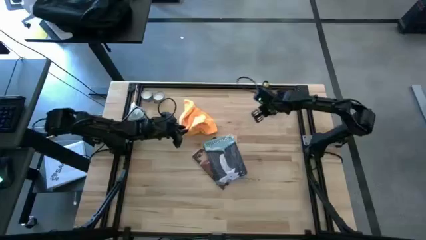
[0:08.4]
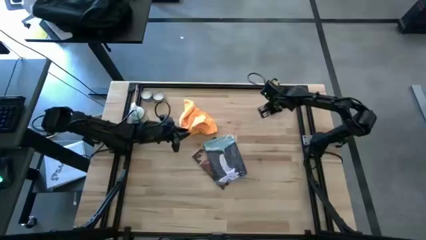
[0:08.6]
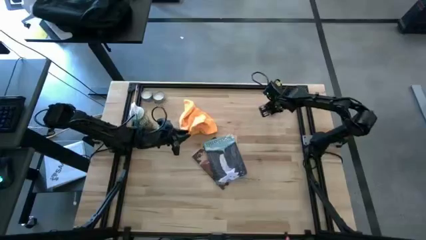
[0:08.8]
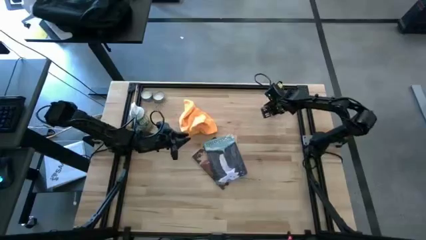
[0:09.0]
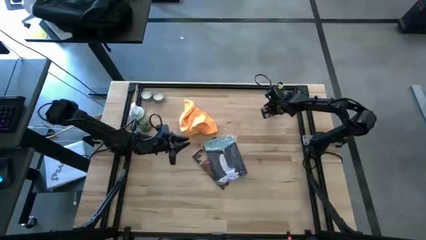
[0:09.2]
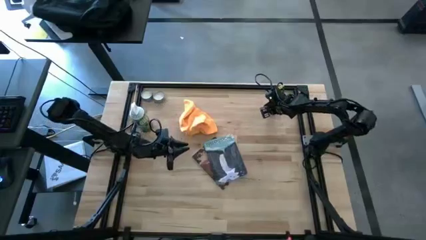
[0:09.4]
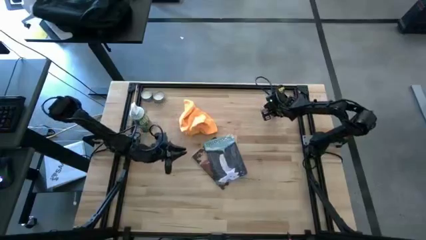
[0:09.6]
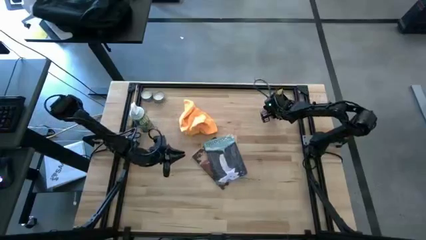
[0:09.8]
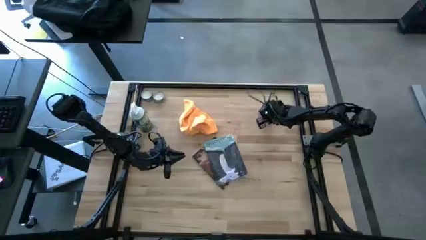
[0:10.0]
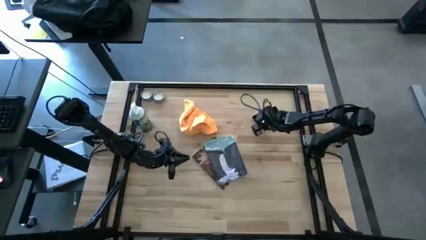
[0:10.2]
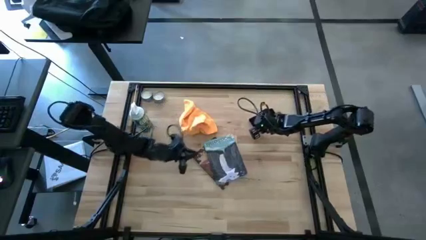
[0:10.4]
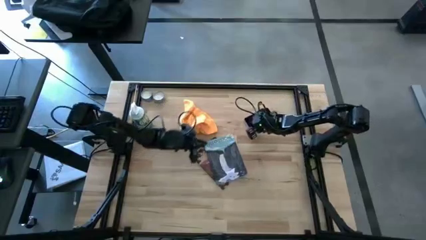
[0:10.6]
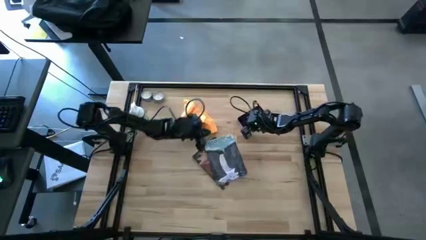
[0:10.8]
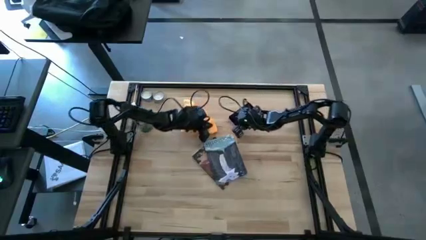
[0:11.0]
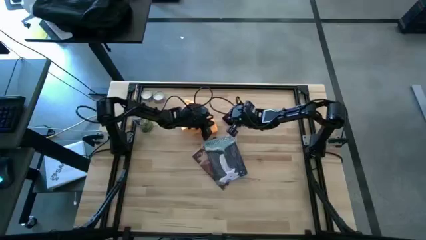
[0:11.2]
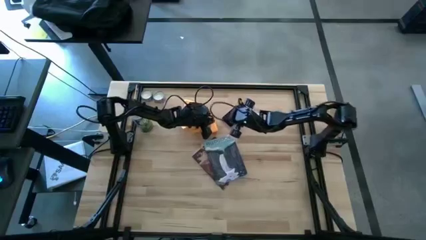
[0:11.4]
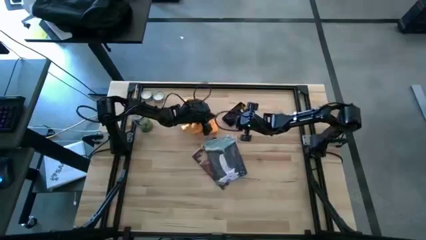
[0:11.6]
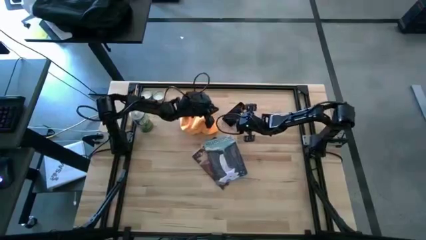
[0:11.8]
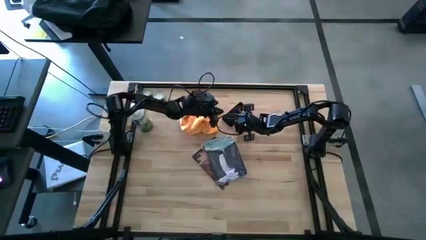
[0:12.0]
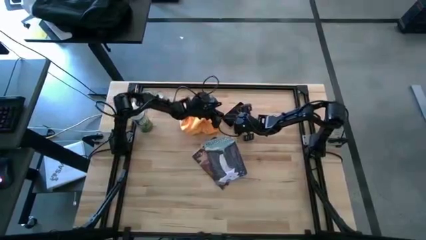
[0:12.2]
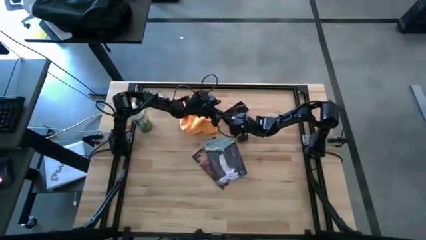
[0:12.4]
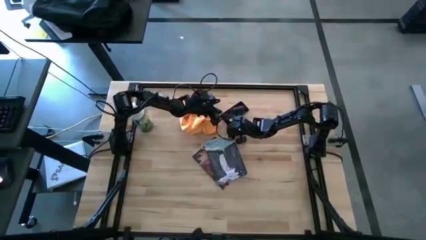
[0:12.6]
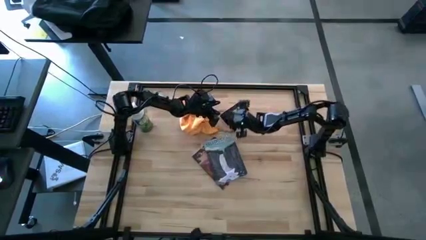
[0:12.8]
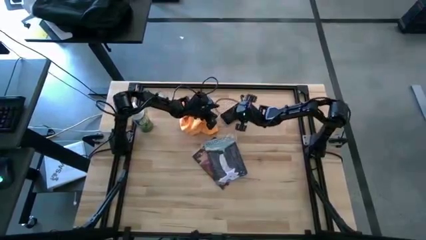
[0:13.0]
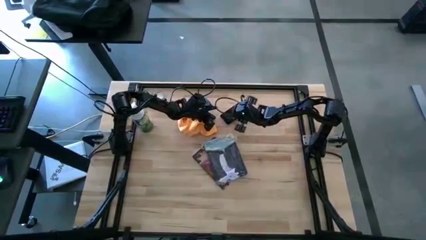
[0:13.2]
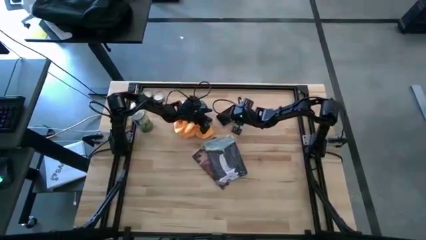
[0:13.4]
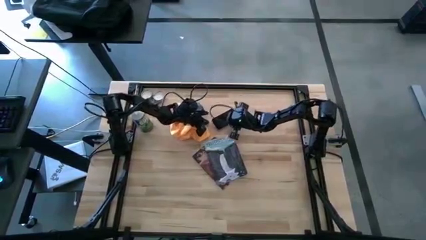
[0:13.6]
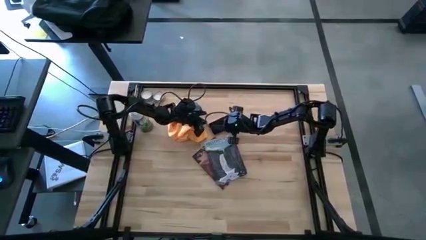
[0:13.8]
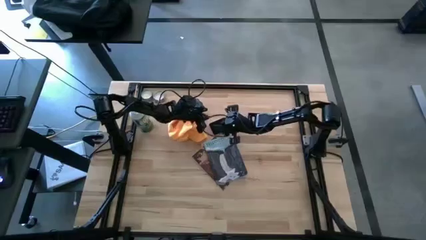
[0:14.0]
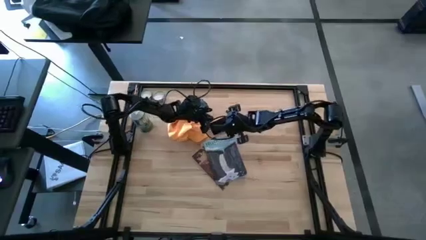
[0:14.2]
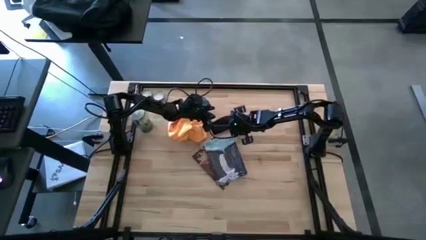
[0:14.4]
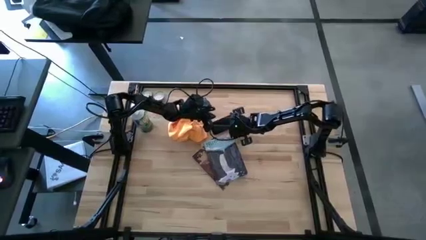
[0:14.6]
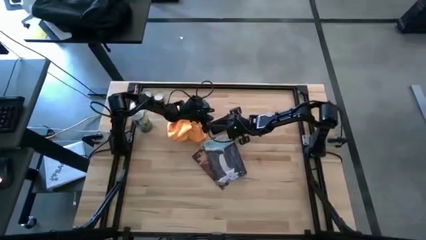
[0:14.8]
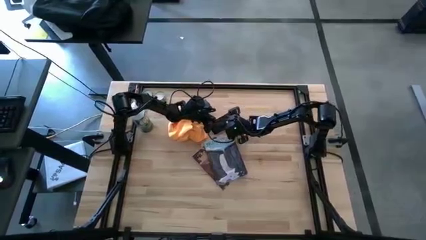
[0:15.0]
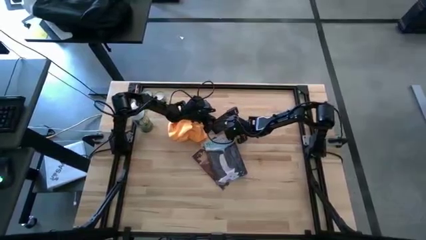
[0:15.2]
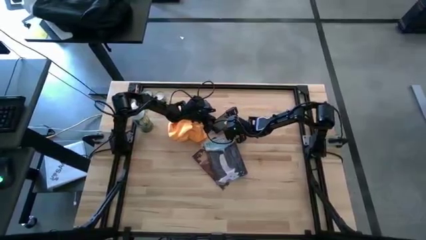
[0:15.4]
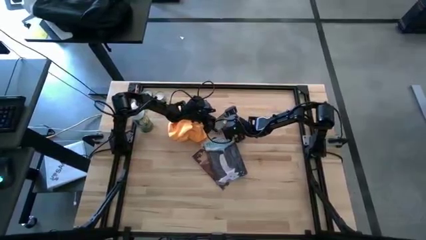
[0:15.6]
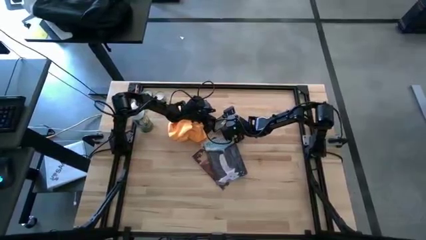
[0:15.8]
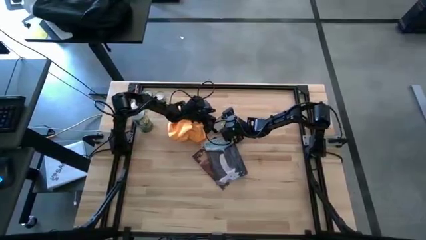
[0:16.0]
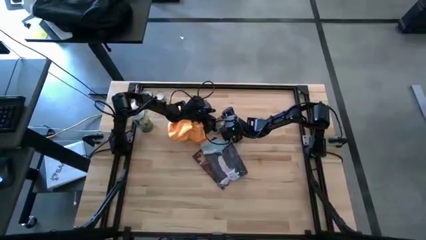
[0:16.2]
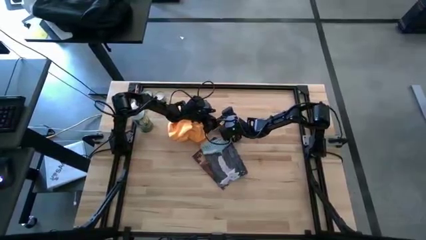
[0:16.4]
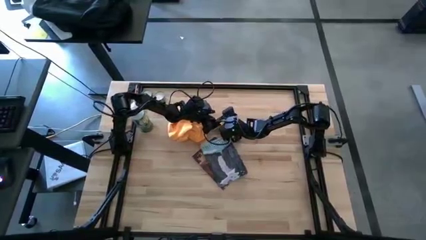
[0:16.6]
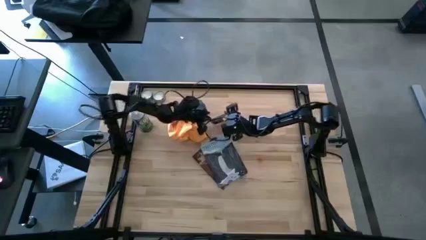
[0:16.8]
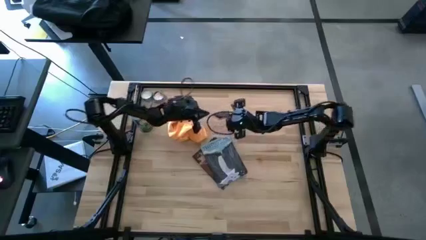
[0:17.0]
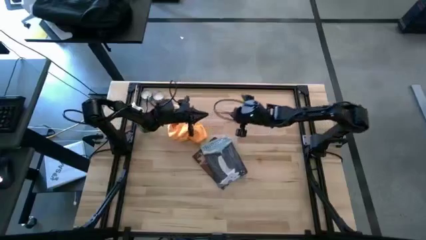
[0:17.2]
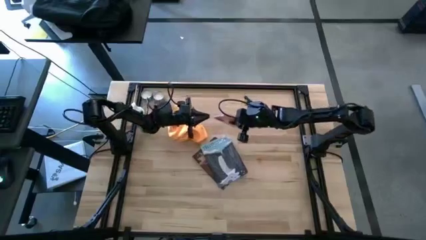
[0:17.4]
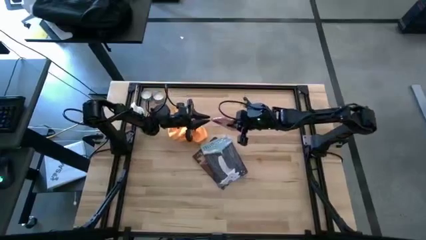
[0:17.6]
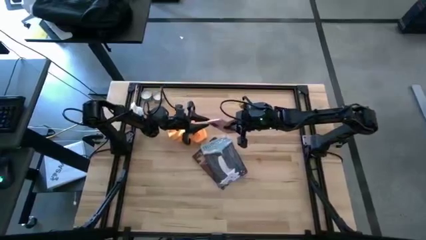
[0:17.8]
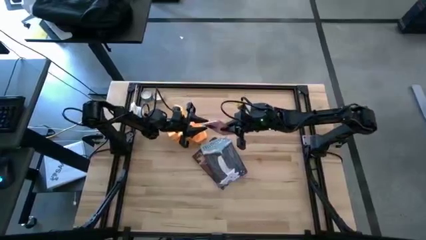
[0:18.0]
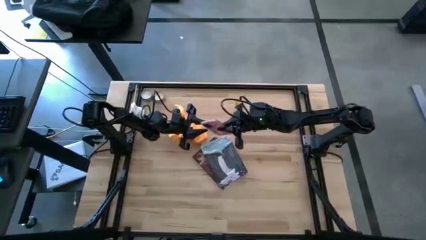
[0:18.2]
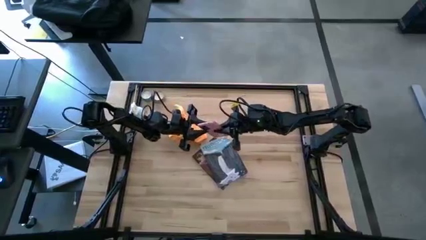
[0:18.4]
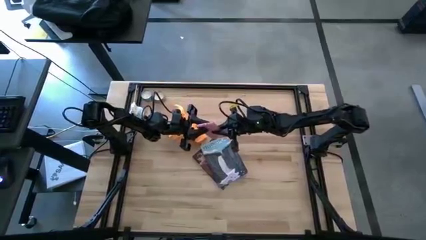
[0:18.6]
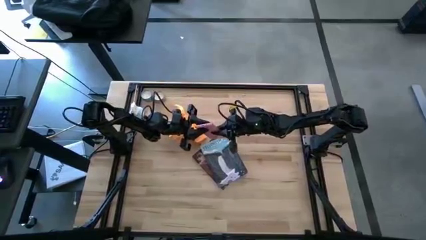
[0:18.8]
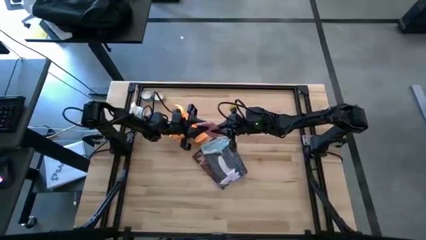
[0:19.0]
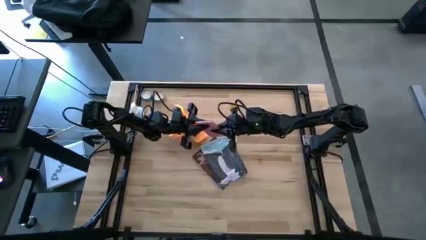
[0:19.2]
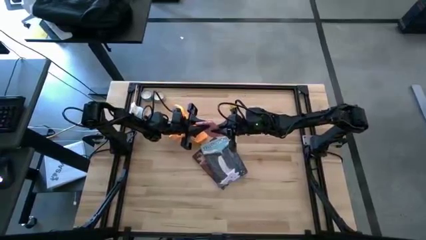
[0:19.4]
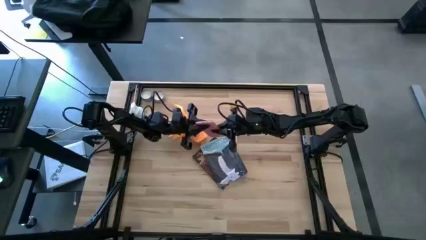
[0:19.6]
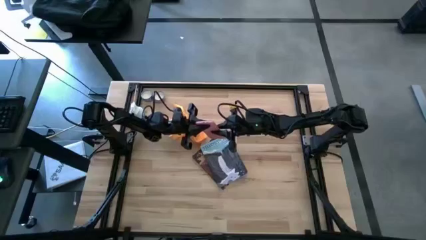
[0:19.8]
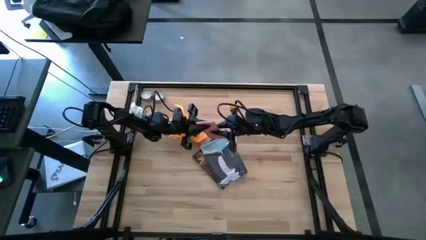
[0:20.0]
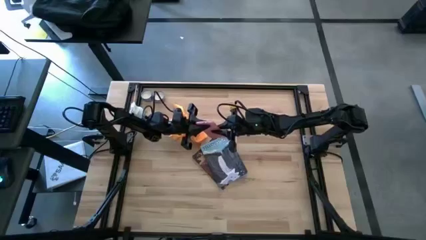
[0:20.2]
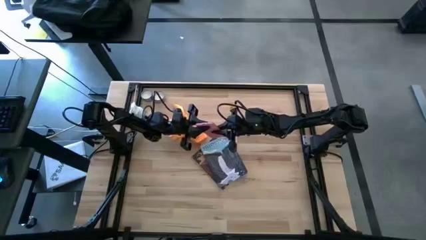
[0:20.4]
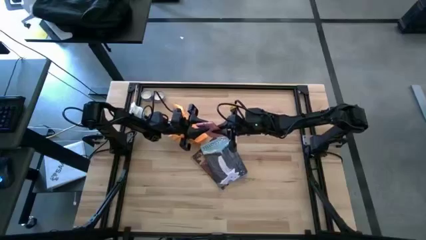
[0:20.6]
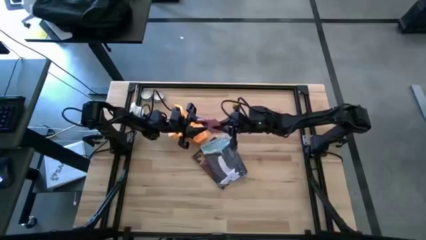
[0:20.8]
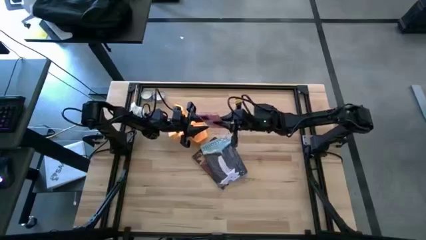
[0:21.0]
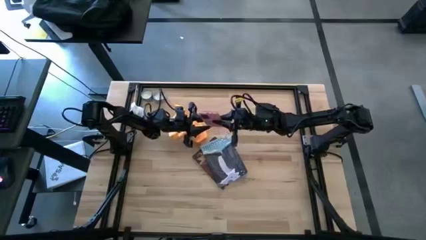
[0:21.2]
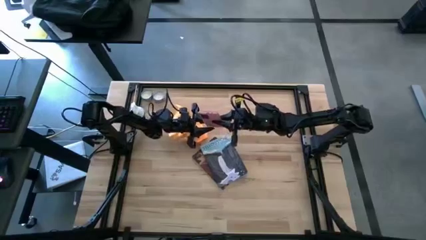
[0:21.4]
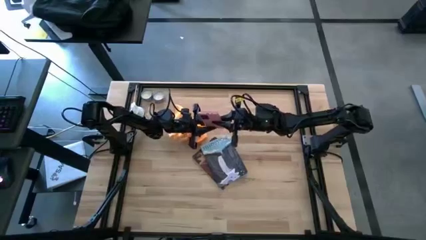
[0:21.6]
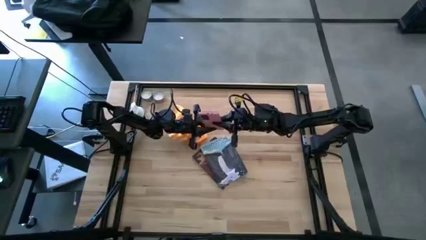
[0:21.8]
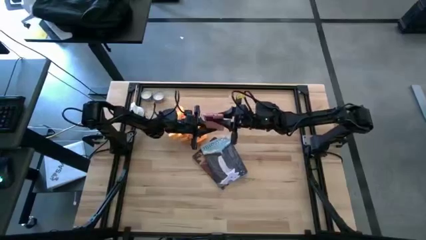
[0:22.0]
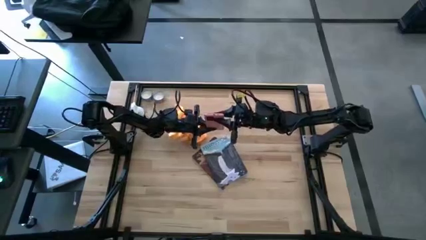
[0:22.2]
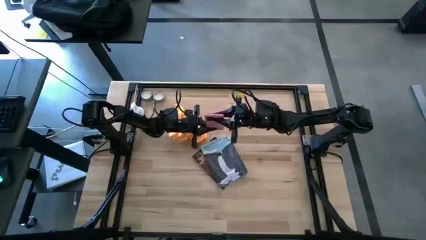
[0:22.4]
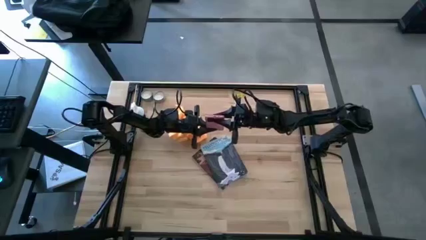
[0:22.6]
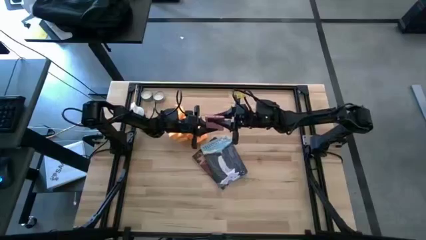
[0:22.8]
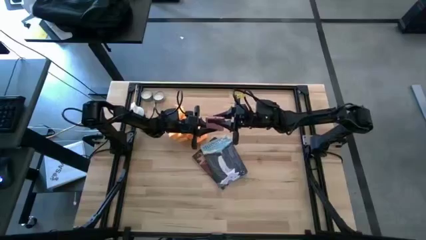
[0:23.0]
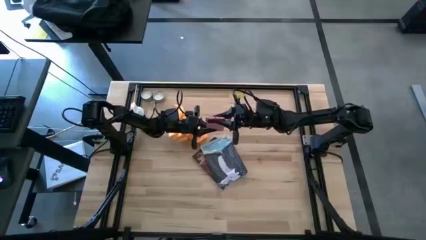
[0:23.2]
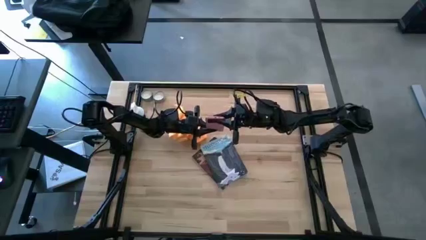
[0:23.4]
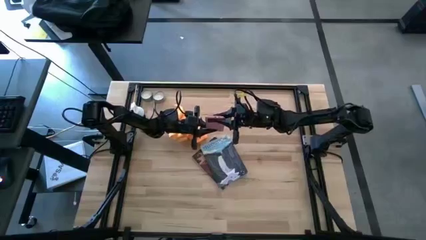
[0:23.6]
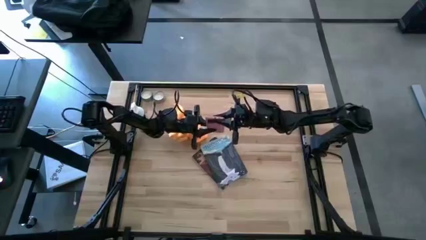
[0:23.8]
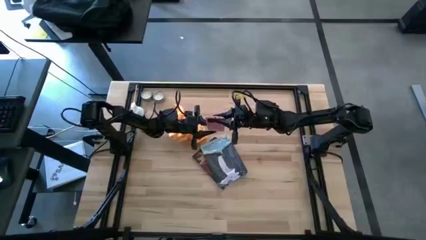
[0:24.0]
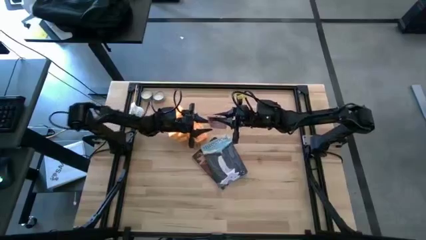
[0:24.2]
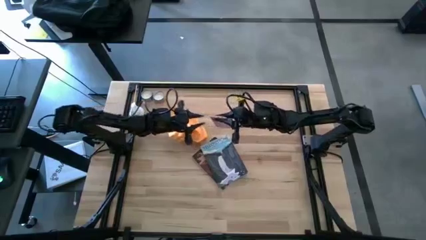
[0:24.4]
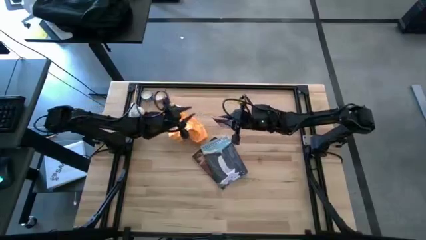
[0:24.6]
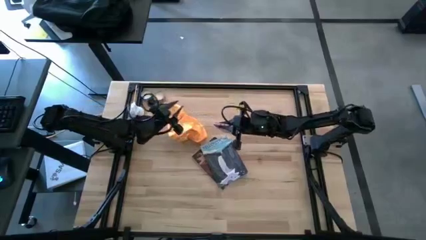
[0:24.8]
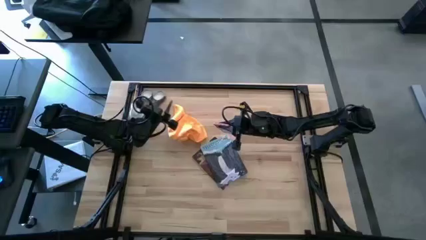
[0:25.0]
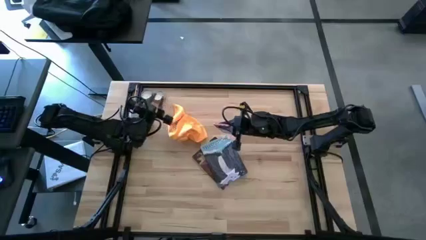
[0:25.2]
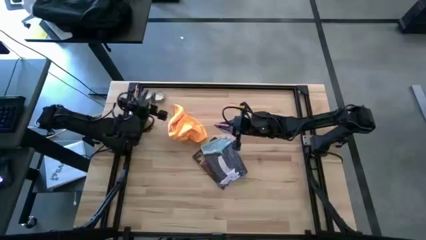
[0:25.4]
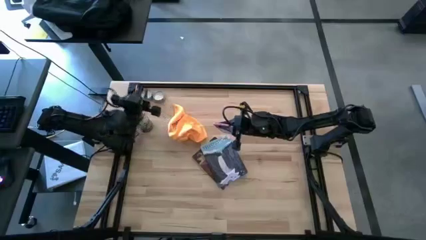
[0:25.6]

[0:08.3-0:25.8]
Task: Apply microfiber cloth
Spray the cellphone using the spray bottle
